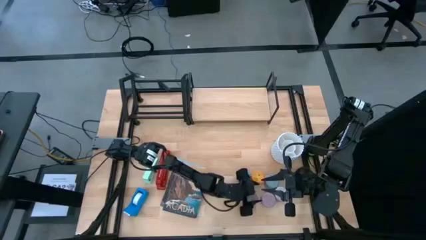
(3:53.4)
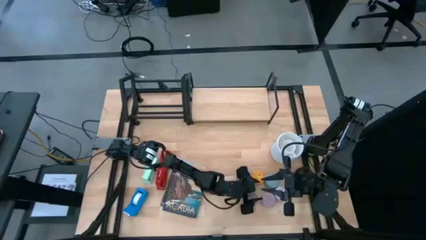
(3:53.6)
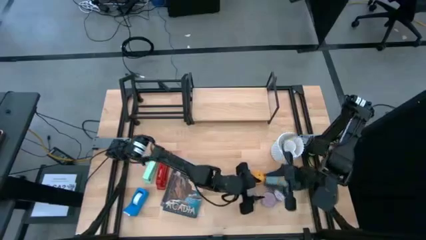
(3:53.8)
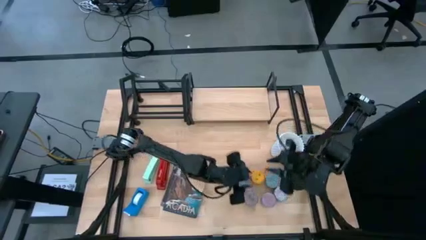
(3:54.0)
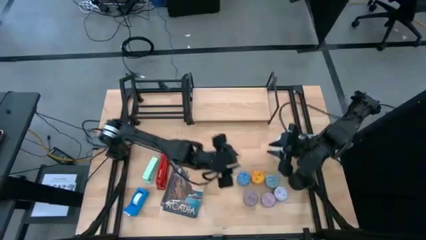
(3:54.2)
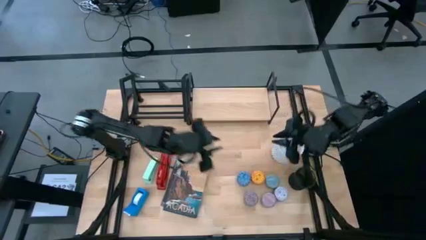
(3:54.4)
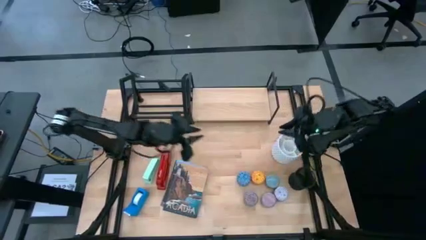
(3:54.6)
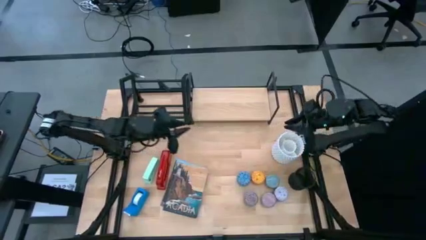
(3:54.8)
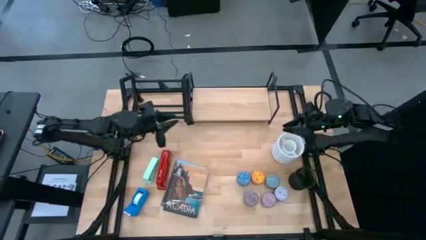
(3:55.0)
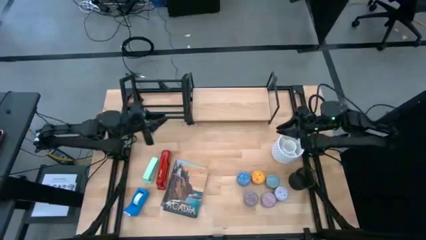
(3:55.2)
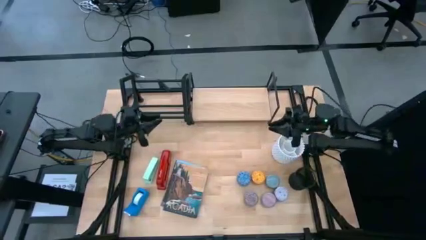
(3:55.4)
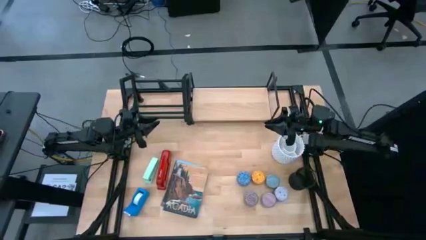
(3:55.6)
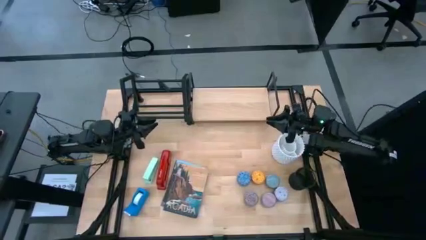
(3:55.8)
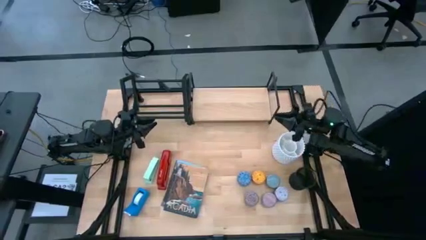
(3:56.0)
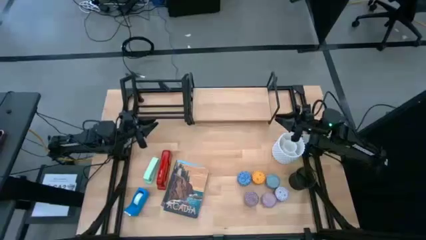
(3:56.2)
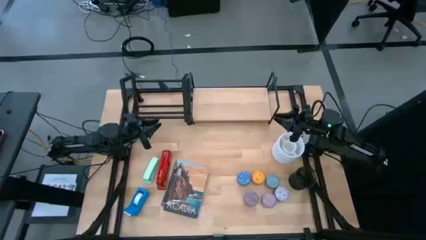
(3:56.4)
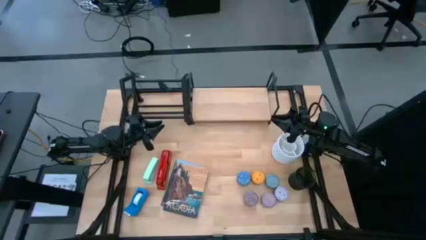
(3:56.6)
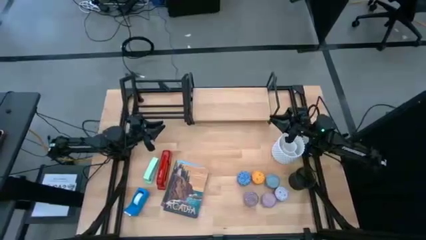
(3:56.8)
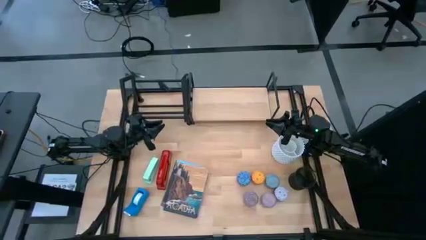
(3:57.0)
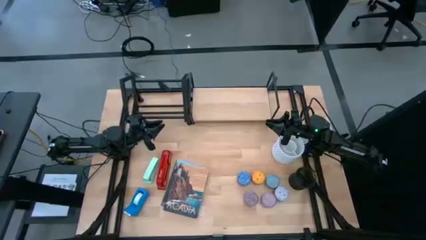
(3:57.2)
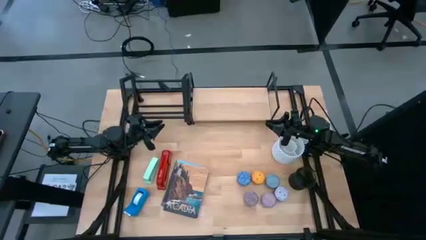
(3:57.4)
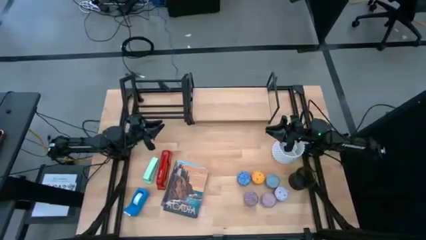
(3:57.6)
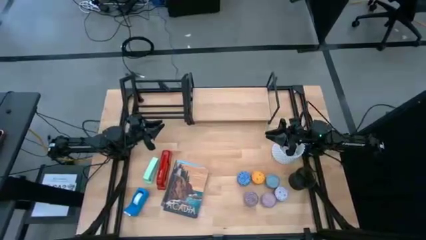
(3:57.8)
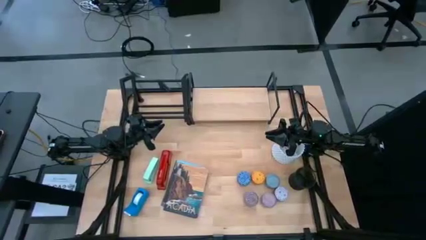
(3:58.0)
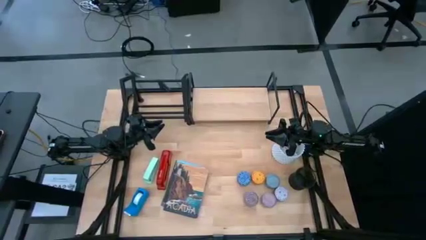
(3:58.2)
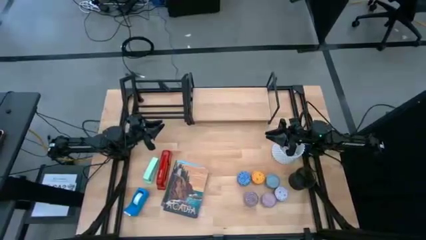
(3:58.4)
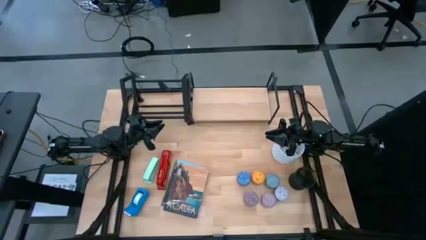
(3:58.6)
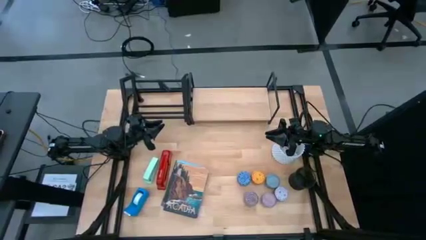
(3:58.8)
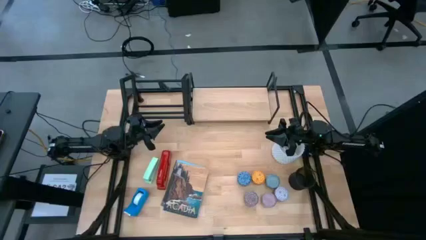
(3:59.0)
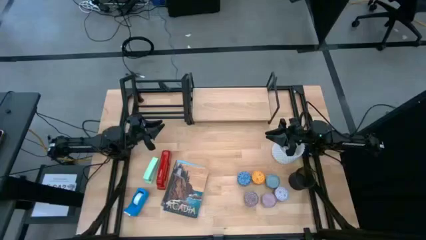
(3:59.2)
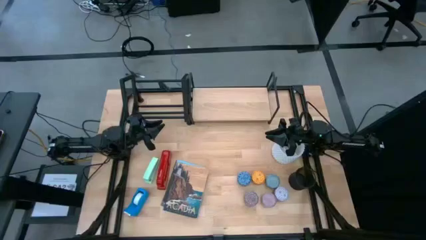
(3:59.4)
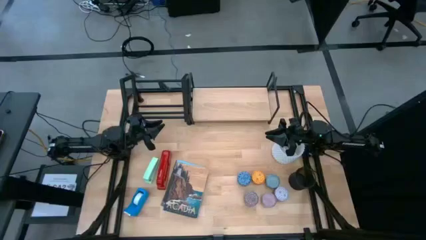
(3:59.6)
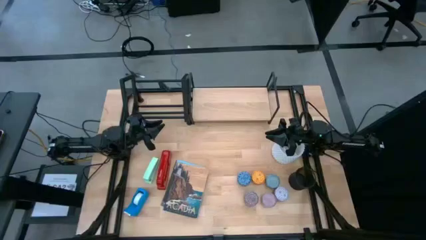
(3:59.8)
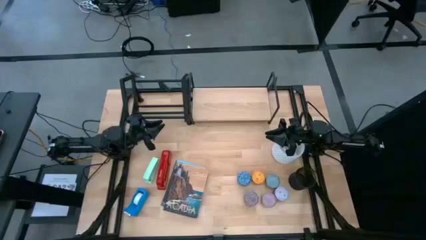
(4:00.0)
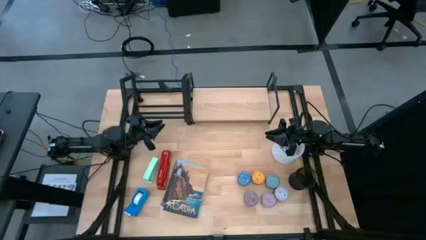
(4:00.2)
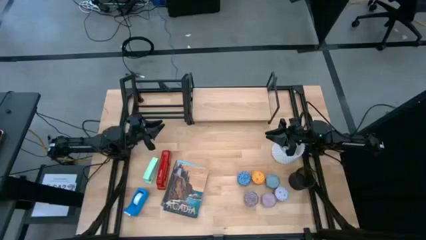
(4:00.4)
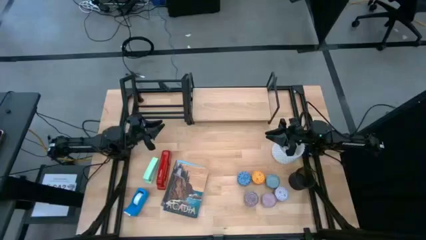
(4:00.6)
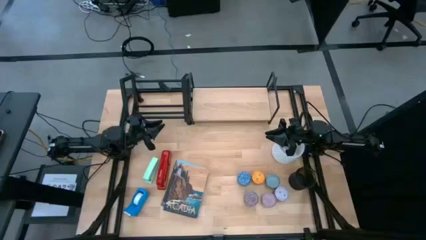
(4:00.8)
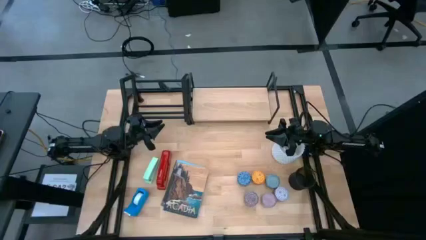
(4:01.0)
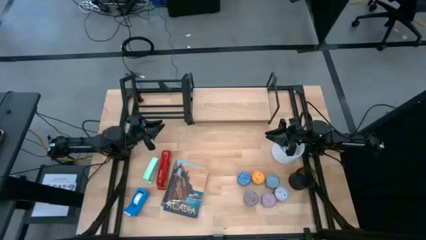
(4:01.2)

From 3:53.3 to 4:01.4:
Task: Stock shelves
Return to Home Position

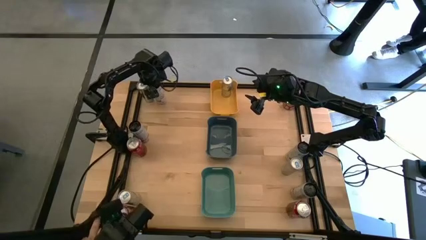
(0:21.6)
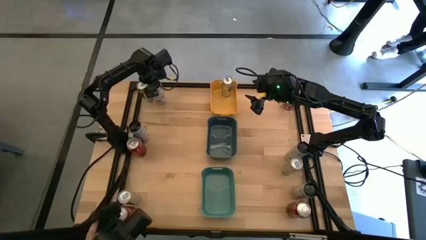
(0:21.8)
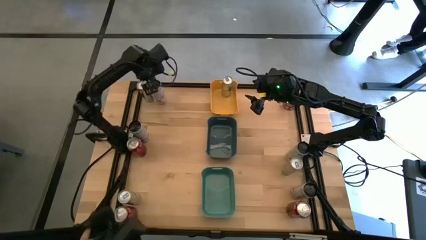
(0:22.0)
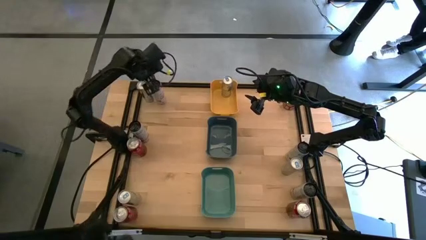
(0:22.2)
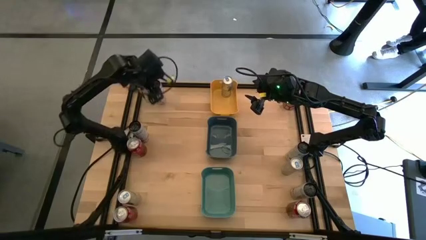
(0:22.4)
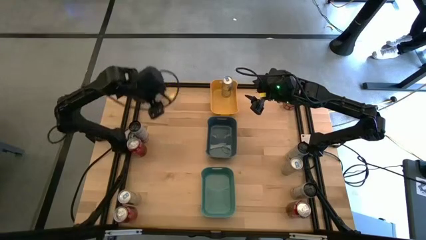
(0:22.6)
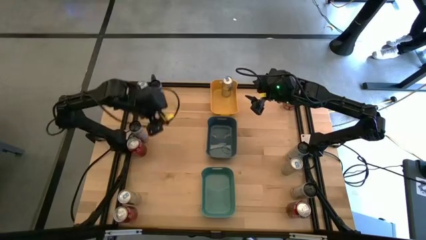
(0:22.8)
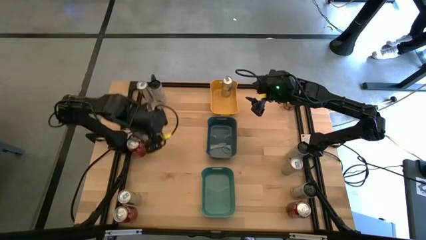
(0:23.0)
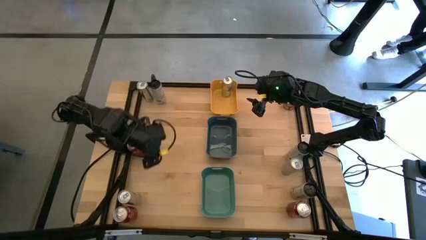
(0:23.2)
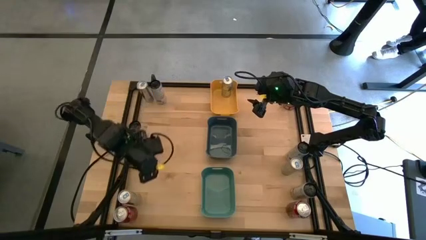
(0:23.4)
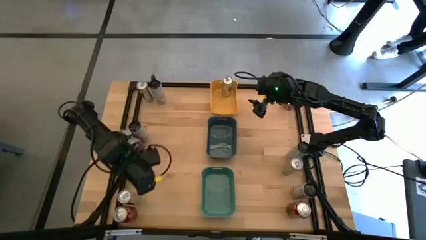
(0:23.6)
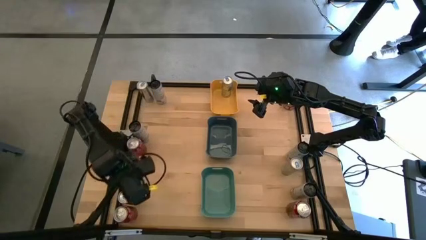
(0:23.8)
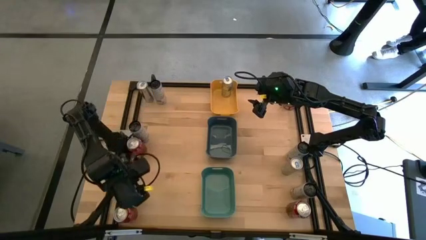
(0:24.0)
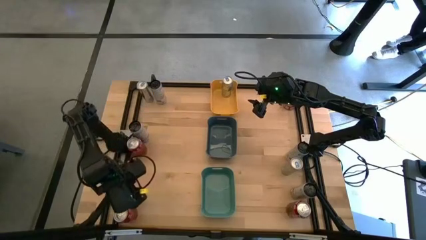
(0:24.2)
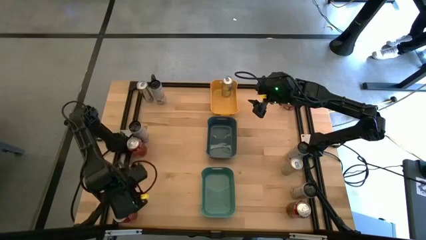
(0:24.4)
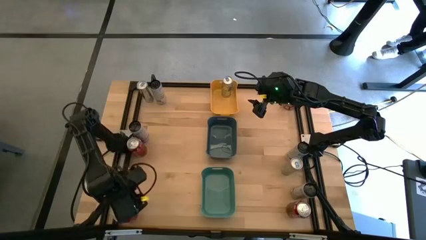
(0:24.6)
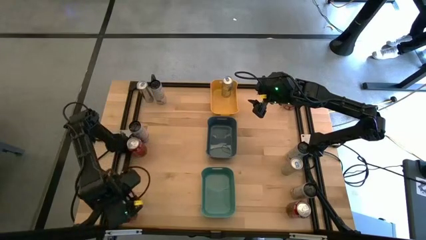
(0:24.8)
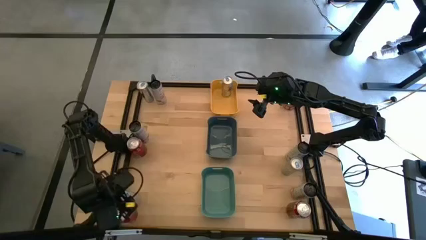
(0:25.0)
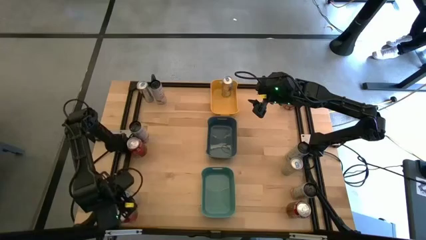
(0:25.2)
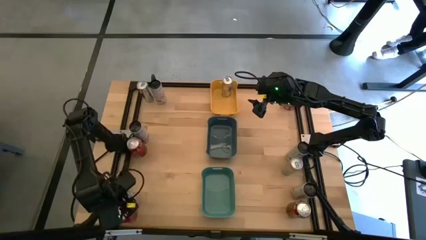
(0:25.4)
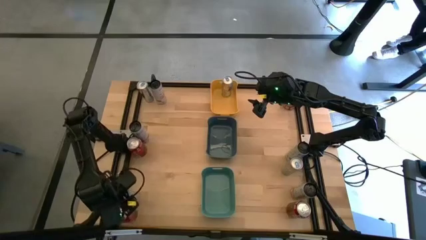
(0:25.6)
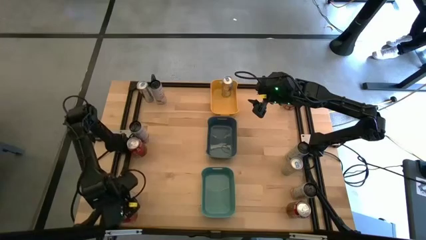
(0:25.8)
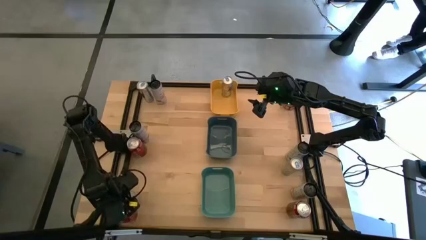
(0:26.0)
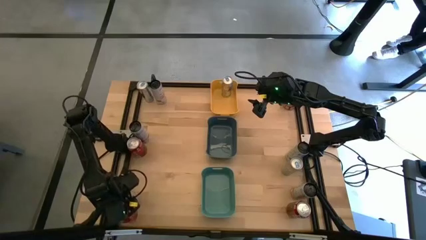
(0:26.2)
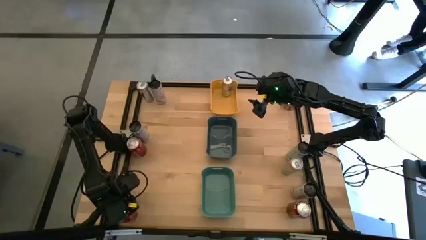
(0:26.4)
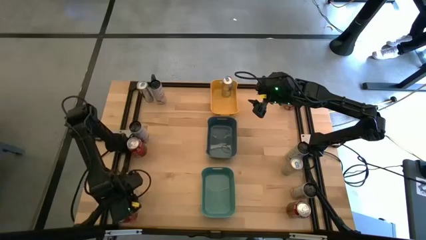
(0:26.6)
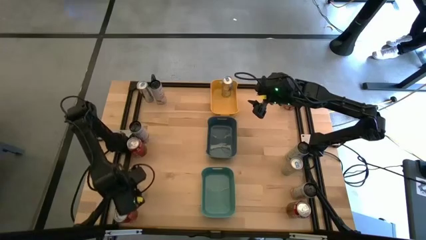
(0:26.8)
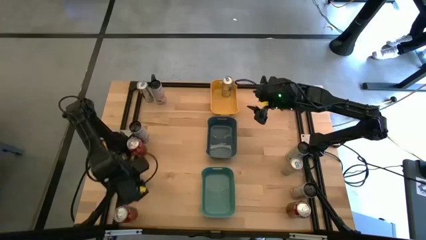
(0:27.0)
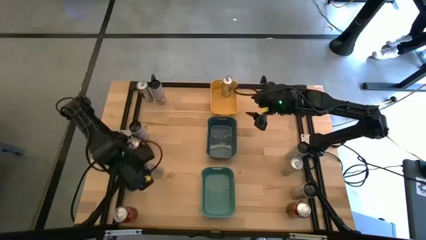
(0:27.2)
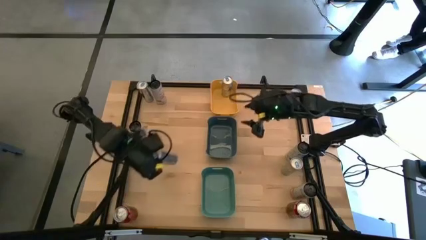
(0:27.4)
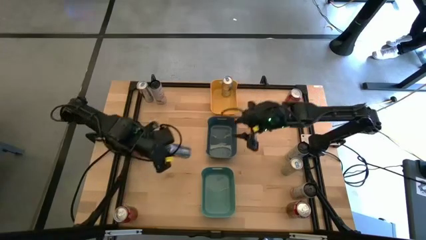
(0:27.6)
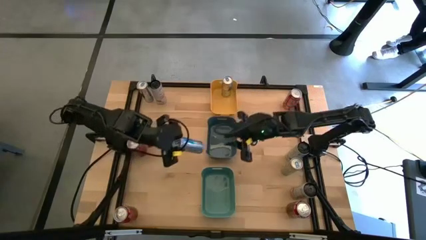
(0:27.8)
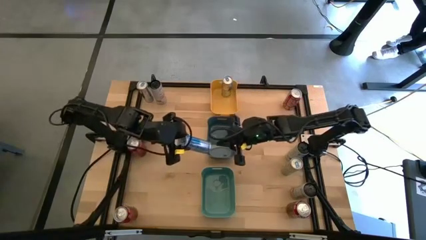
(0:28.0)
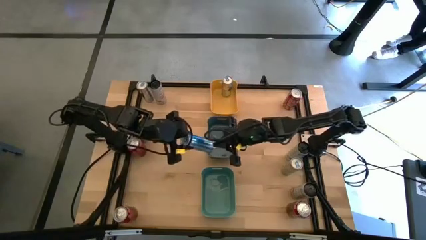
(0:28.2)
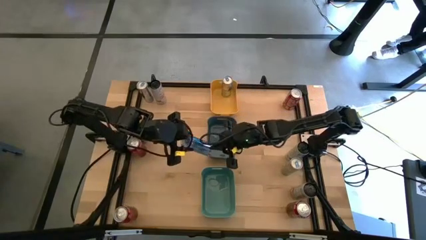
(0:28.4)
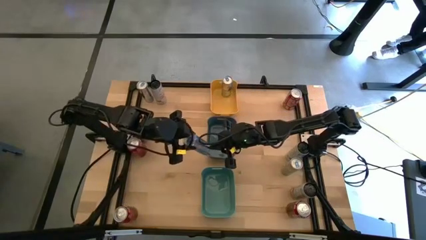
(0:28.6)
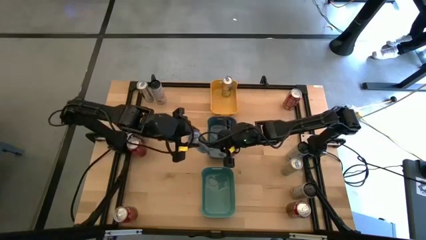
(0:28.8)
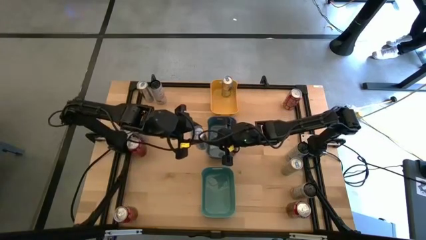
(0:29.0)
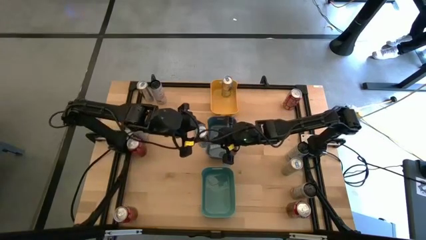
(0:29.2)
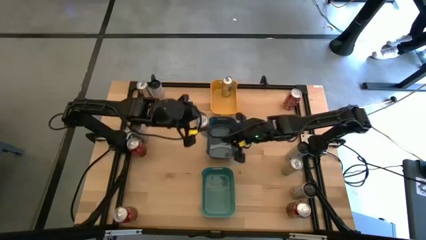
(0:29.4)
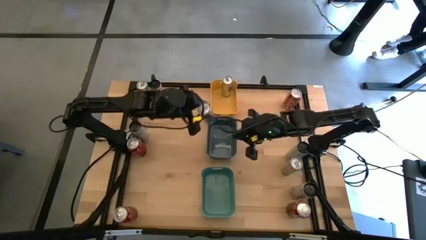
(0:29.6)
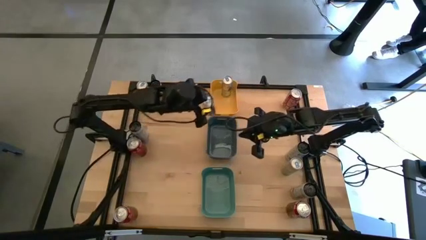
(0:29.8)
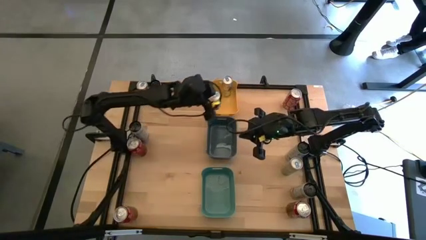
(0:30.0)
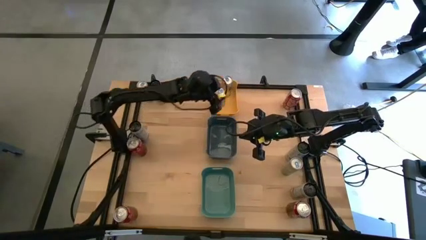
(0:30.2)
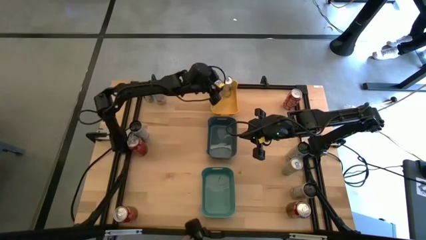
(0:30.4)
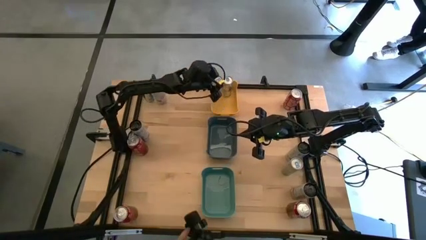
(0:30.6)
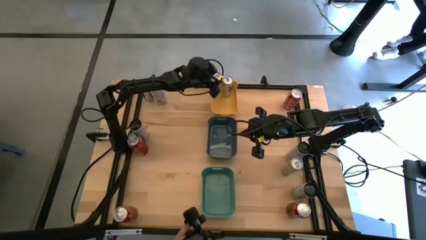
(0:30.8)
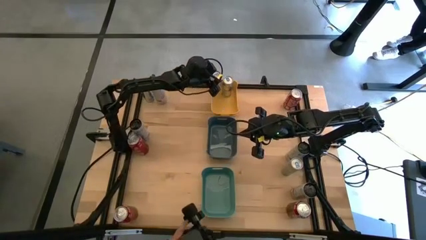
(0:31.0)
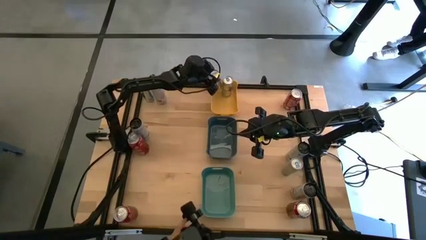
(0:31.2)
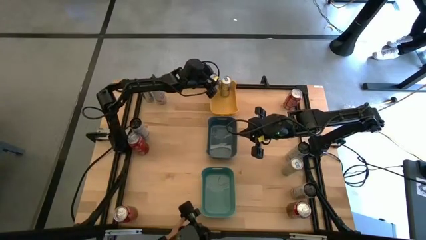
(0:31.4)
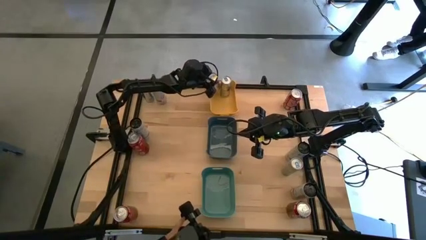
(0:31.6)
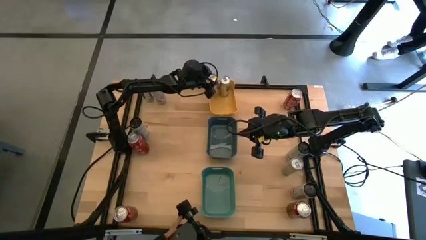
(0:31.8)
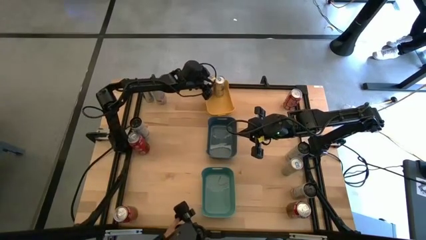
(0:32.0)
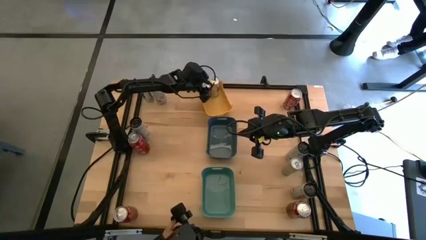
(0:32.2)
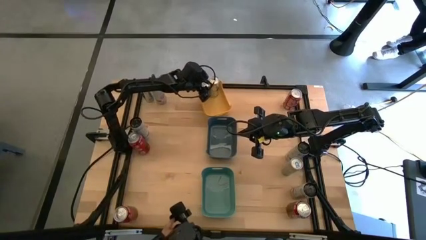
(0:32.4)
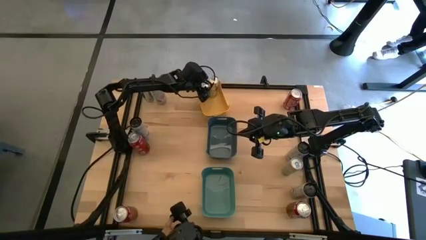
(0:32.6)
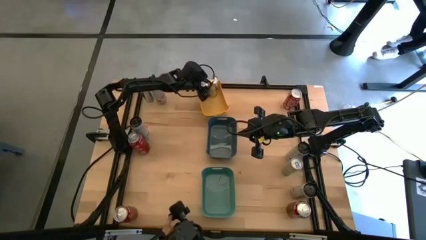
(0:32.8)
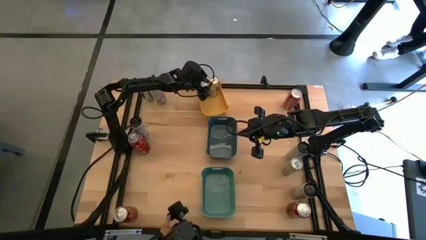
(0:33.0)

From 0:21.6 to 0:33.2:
Task: Sort soda cans
Put the bottom left blue soda can into the yellow bin
